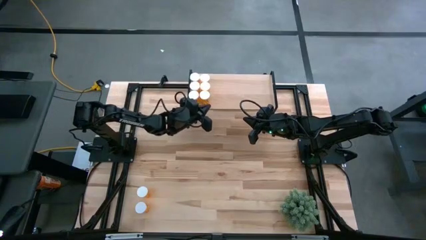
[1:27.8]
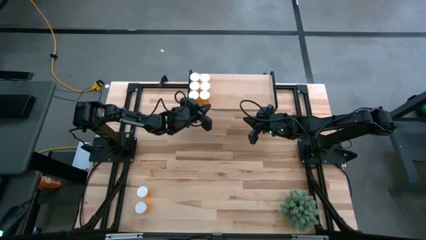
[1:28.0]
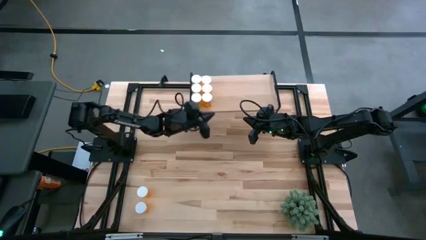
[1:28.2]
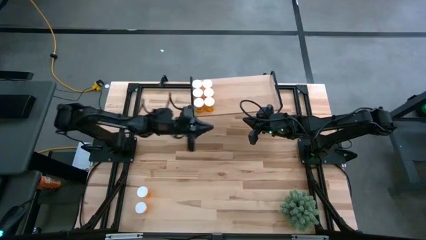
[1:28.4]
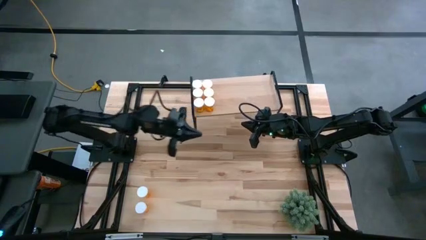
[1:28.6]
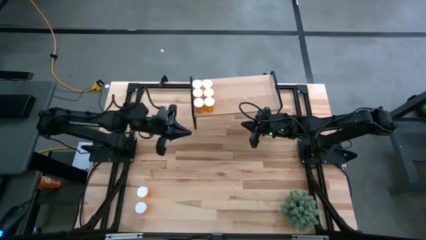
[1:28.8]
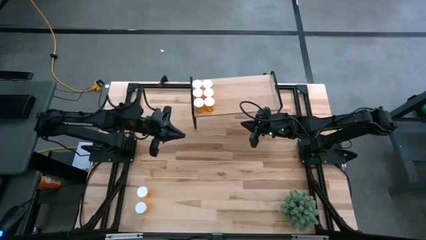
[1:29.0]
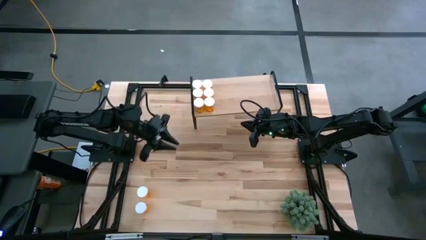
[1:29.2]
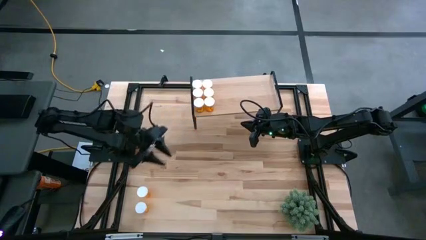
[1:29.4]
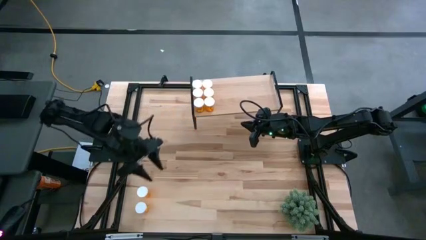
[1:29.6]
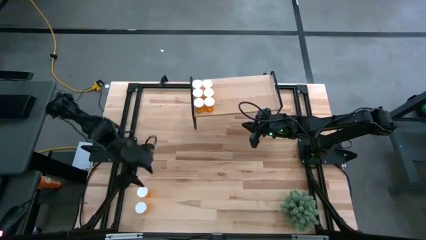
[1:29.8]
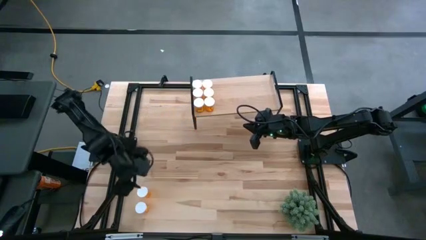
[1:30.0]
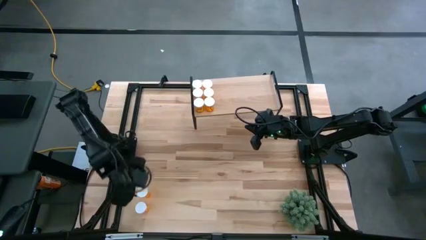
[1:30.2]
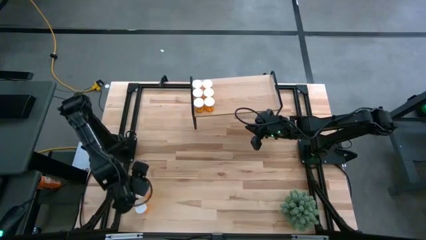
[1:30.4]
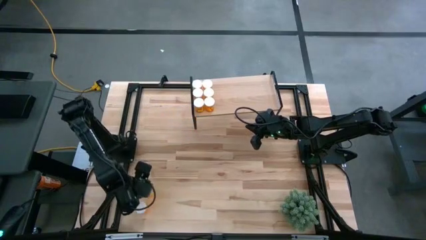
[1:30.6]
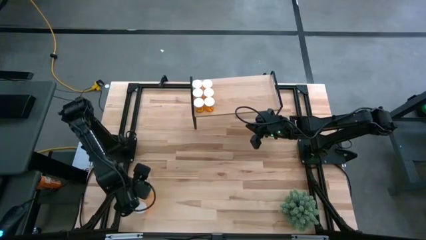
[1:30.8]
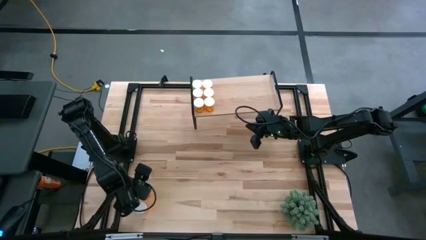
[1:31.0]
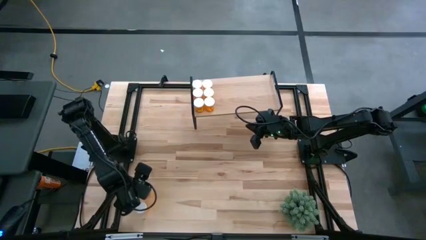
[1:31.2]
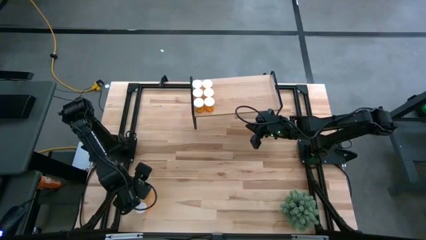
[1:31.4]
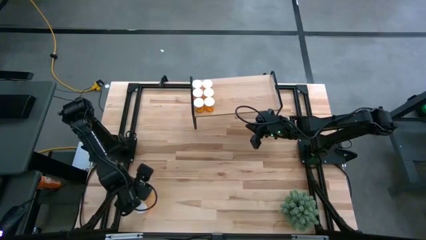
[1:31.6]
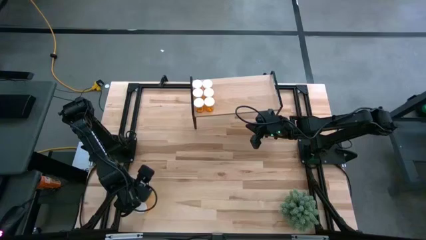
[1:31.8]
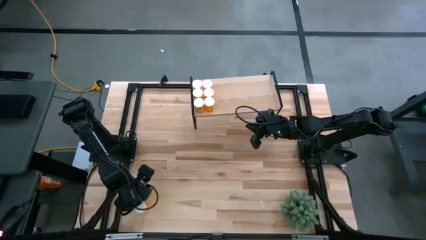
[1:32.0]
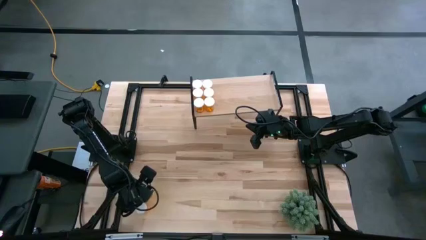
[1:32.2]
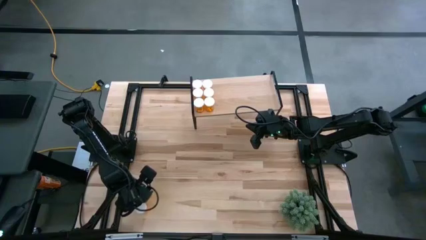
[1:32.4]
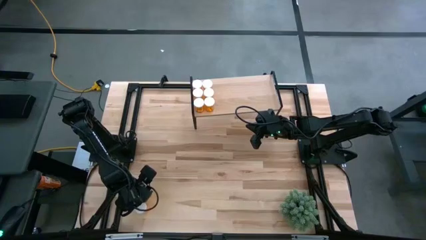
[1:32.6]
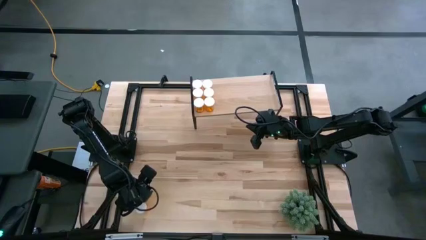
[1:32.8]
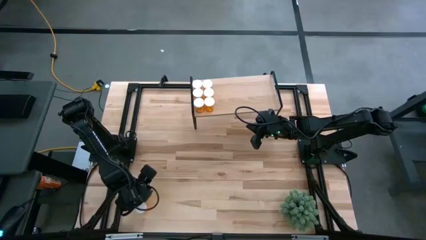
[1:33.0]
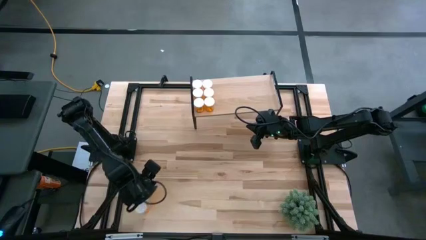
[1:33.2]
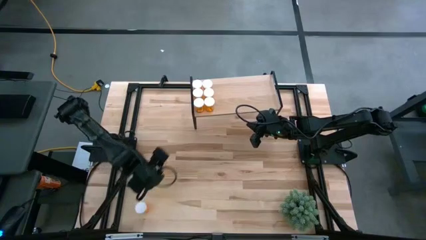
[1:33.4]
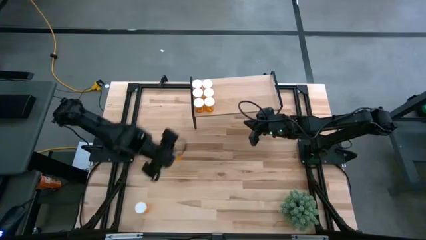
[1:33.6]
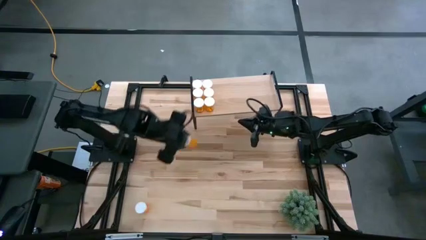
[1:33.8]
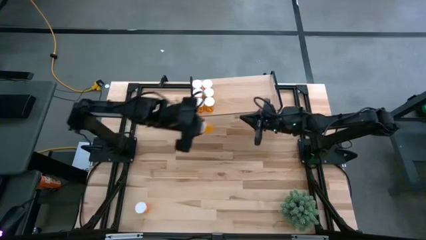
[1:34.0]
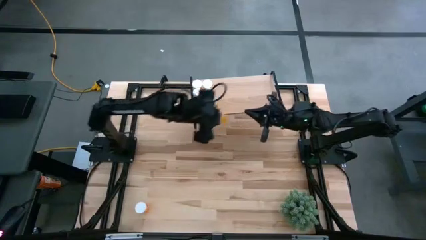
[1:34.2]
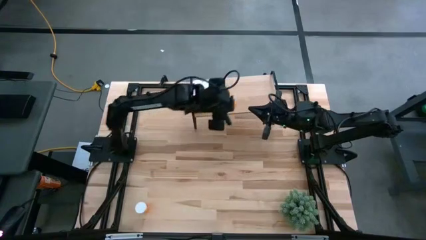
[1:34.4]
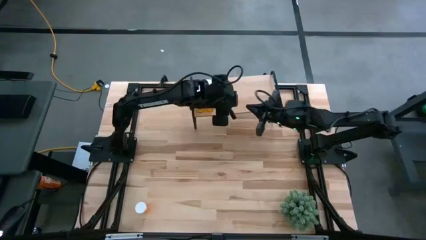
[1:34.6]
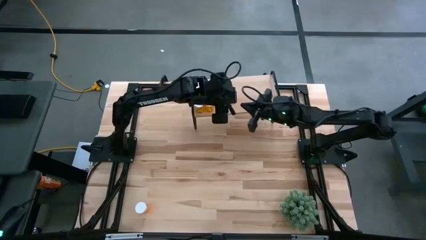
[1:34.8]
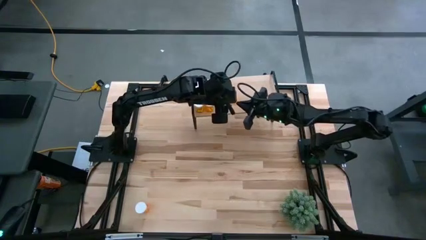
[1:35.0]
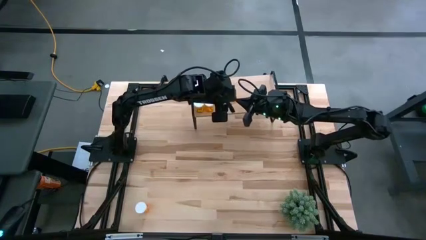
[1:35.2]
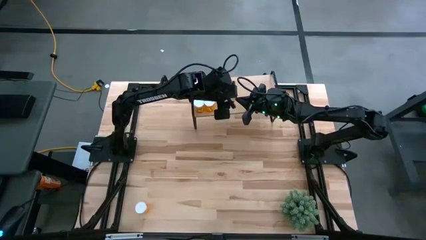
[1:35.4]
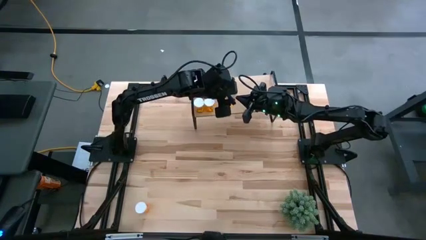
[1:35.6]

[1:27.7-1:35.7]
Task: Pick and place medicine bottles onto shelf by color
Put the orange pill bottle on the shelf

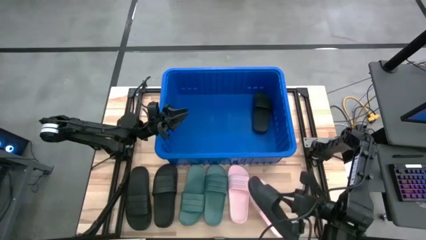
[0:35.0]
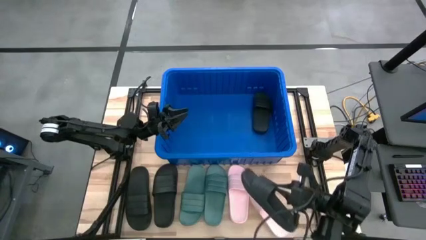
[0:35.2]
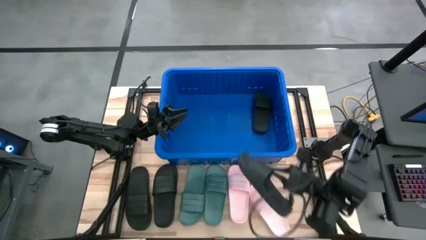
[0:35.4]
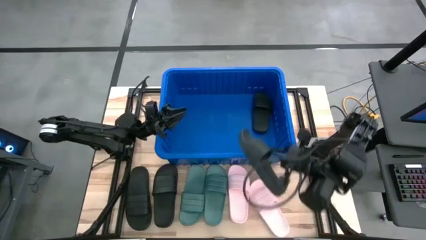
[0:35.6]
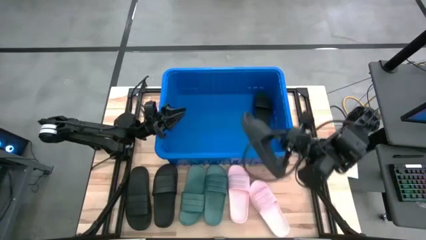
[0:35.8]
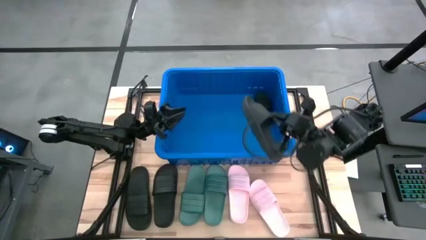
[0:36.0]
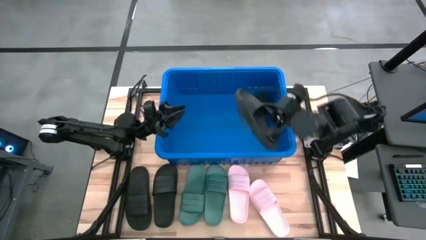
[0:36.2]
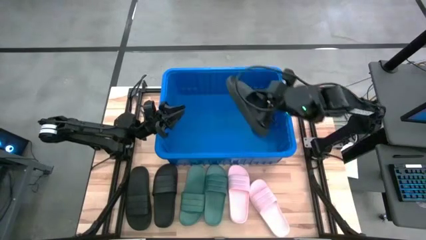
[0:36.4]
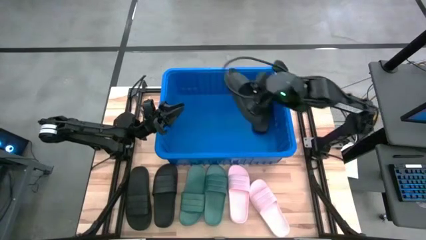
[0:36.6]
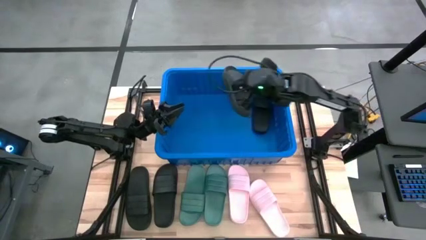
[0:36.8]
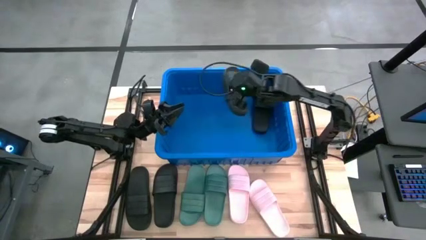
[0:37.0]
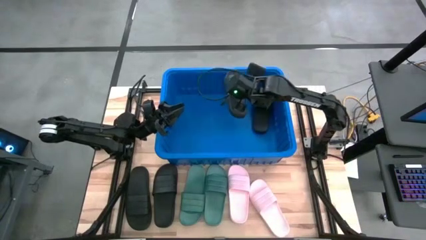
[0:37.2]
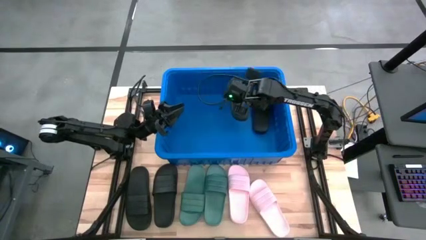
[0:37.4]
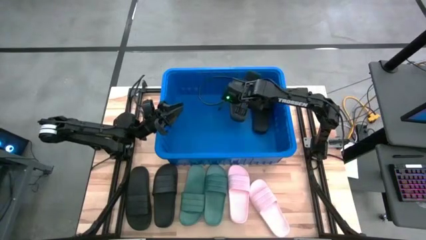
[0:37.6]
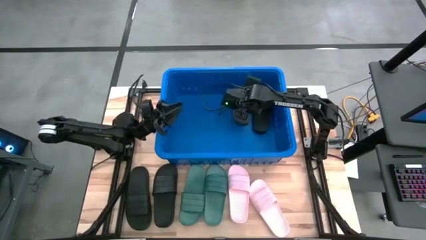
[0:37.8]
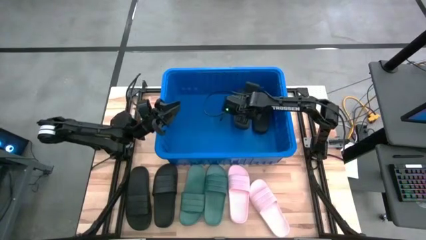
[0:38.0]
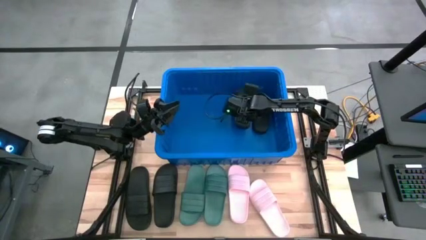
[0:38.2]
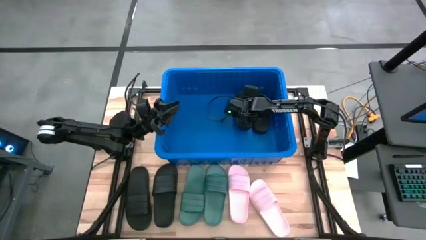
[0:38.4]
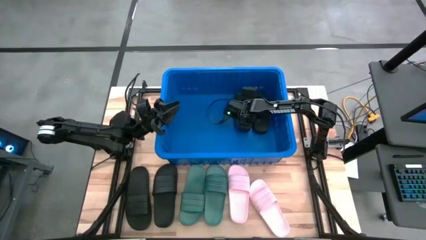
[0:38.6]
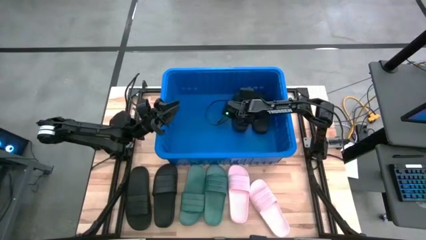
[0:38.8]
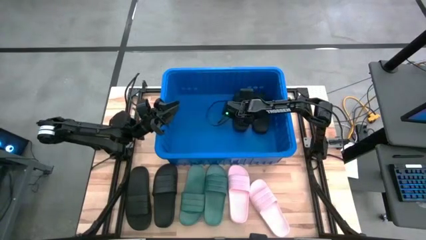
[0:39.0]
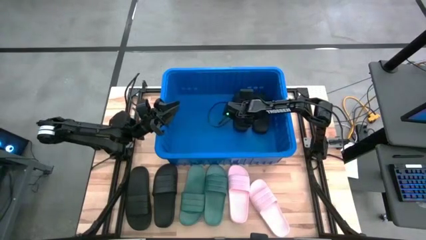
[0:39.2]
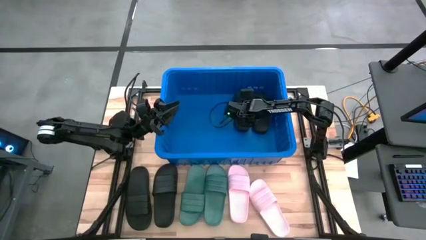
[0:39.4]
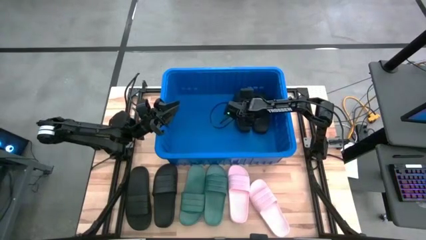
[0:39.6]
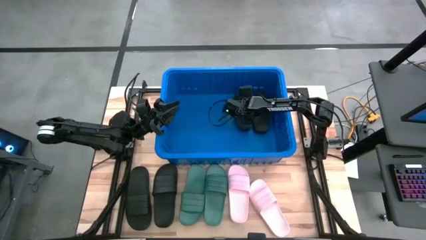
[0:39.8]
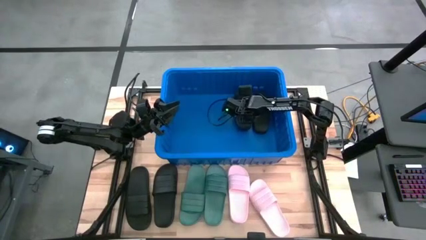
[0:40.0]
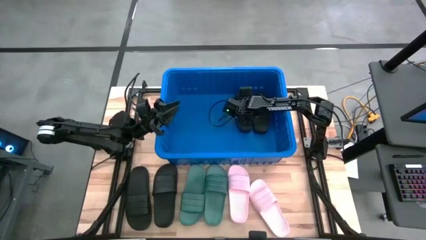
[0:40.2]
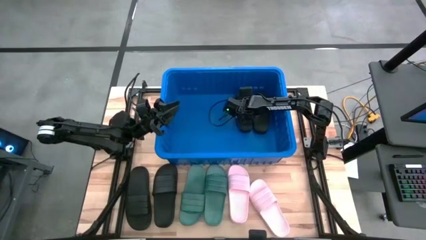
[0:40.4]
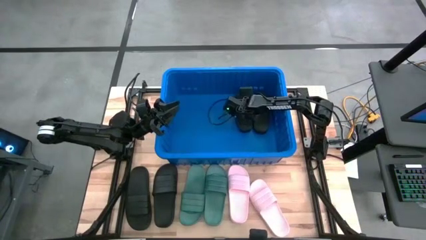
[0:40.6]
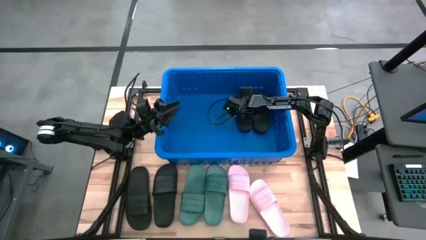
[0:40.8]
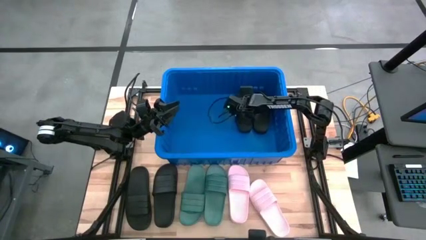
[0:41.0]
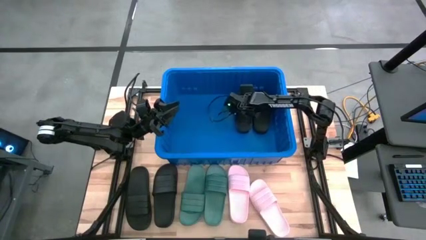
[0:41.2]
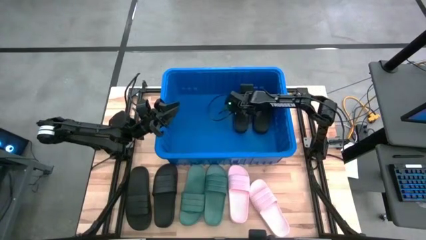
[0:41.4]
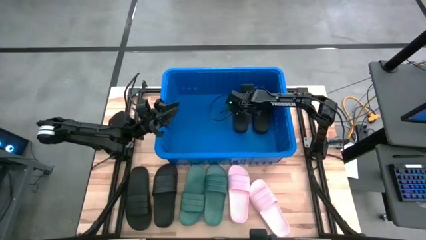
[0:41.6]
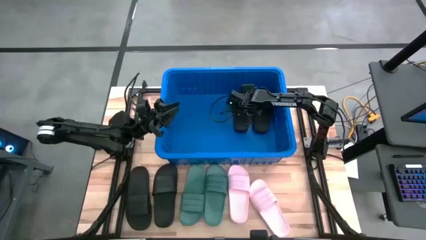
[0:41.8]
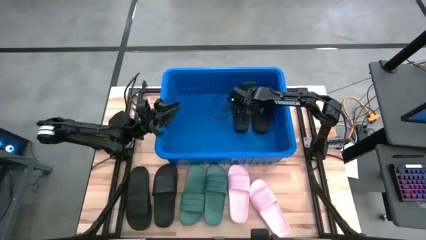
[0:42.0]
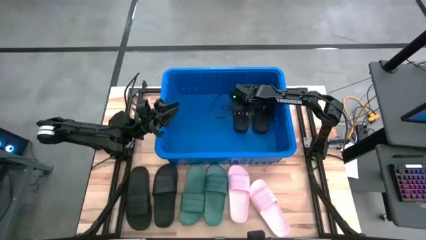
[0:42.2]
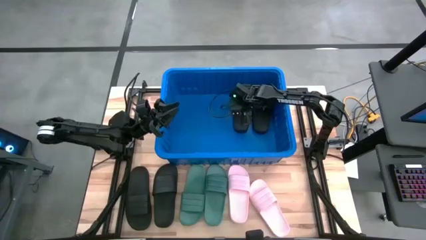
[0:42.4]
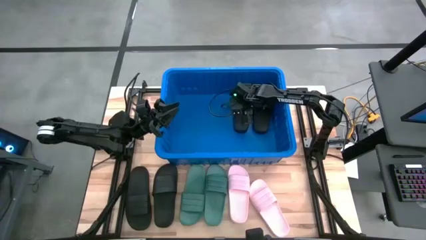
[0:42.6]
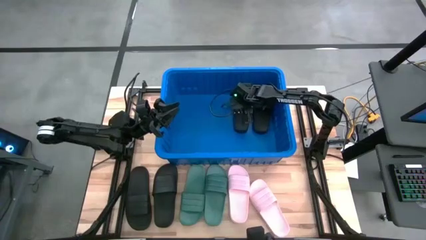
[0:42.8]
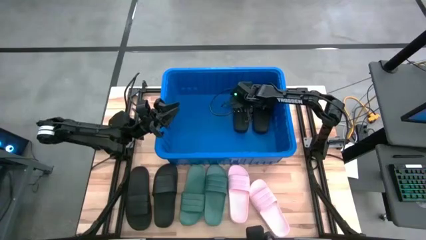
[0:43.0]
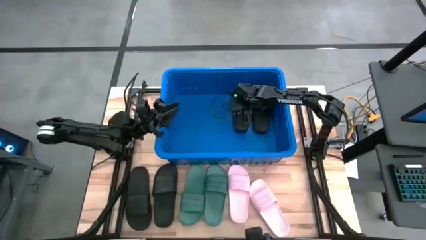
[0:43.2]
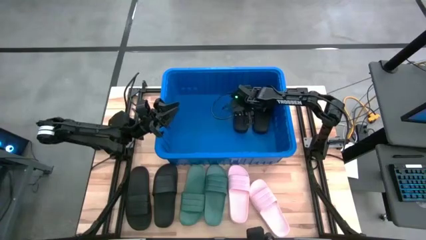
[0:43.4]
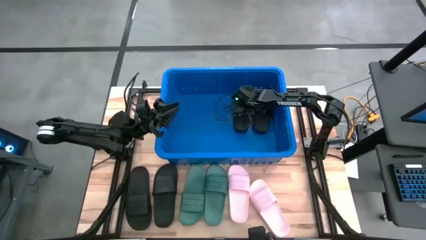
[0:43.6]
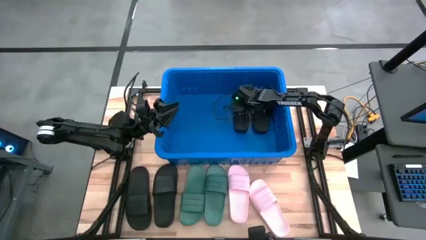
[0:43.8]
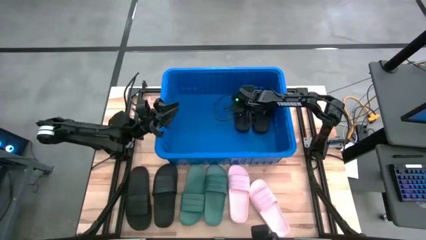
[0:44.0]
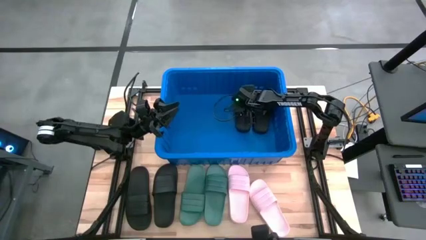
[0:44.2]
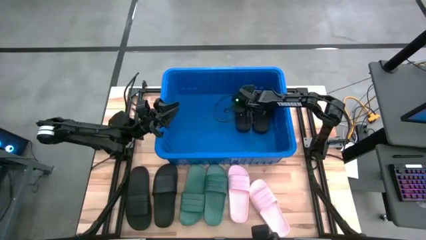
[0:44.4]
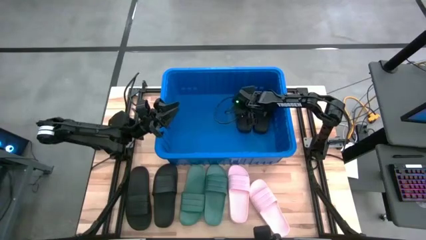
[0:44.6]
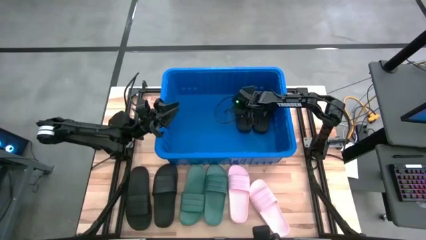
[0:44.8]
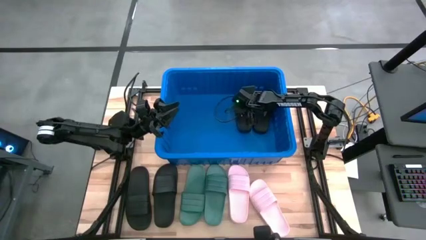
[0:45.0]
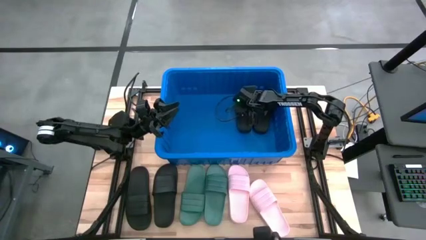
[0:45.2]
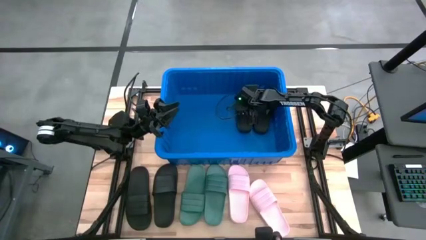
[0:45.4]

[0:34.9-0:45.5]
Task: Pick and place slides into bin
Put the black slipper into the blue bin
